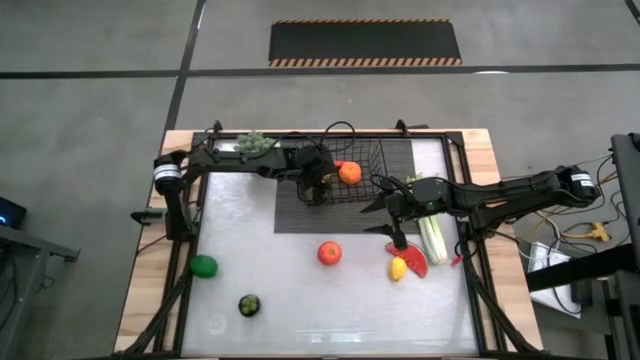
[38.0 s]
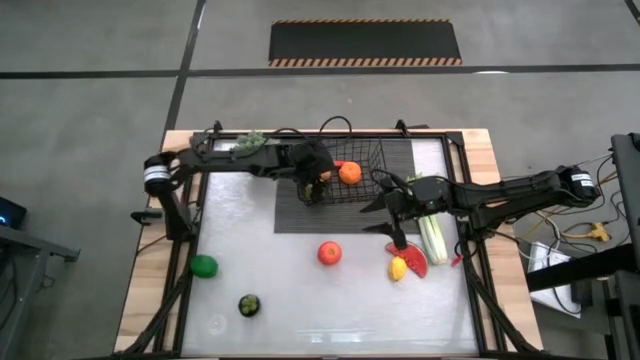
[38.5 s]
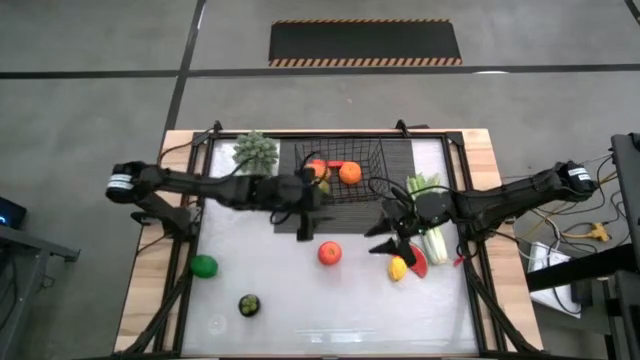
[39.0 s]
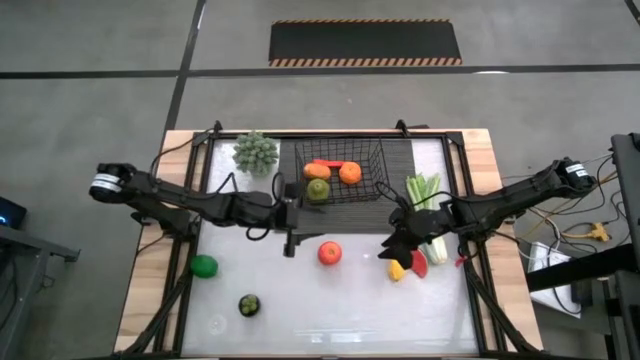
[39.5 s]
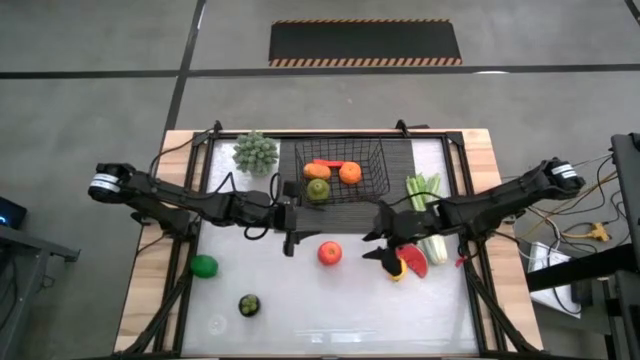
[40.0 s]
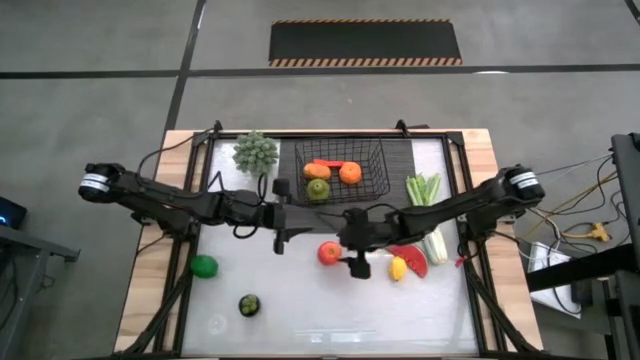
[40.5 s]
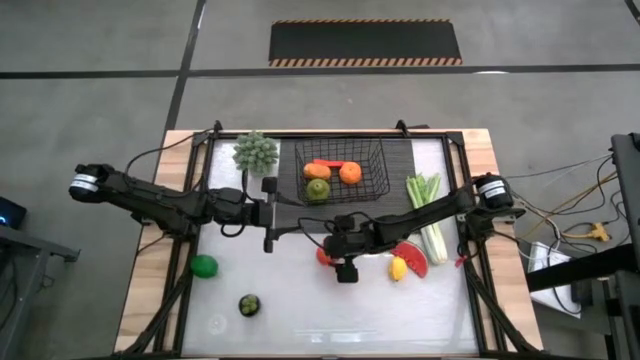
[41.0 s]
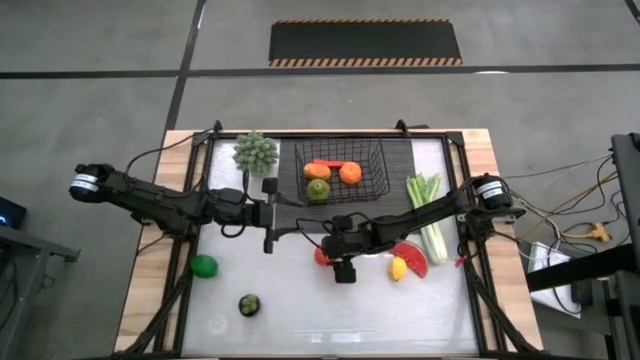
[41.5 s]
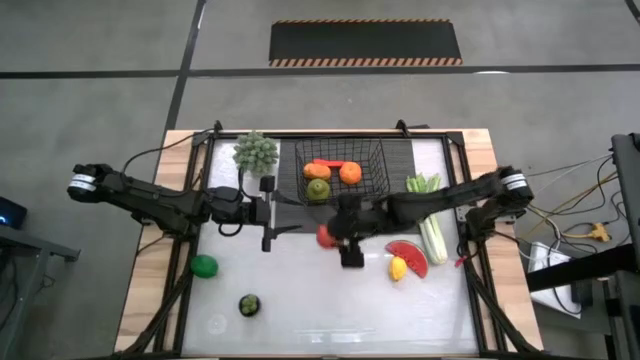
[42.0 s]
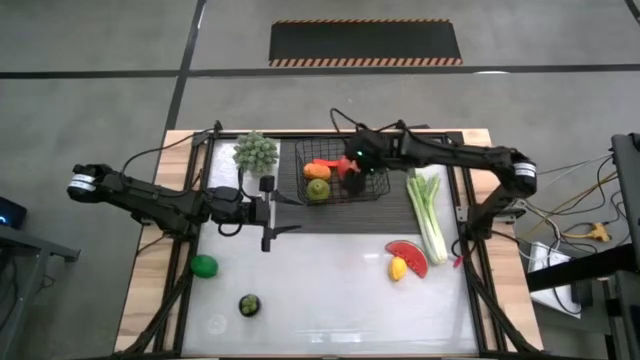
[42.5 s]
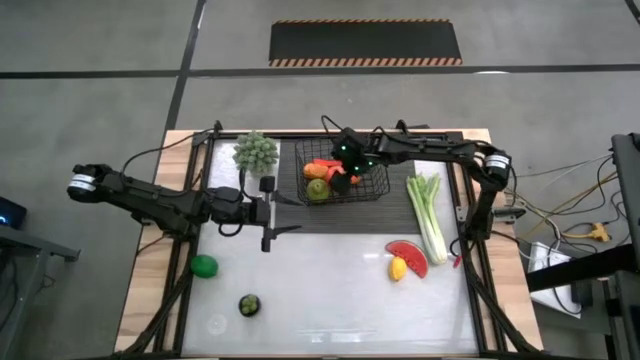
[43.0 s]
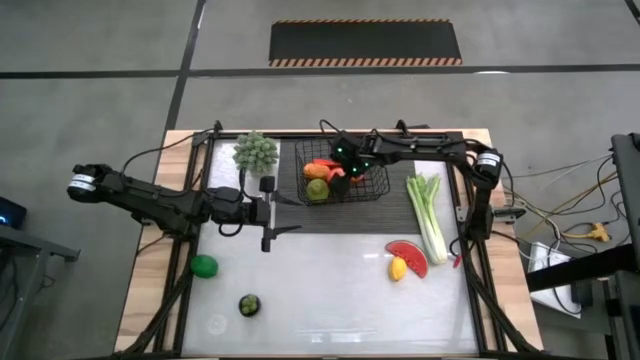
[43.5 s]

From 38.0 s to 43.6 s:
Task: Build produce basket
Put the red apple into the black wire basket

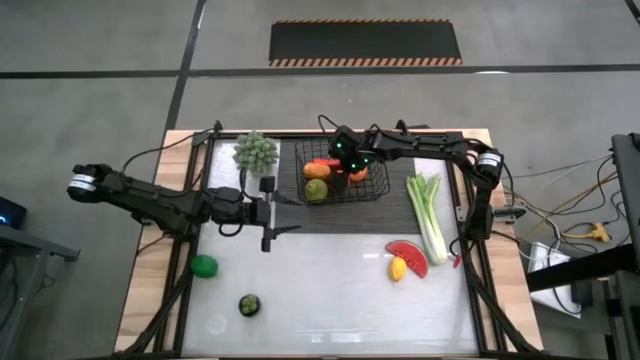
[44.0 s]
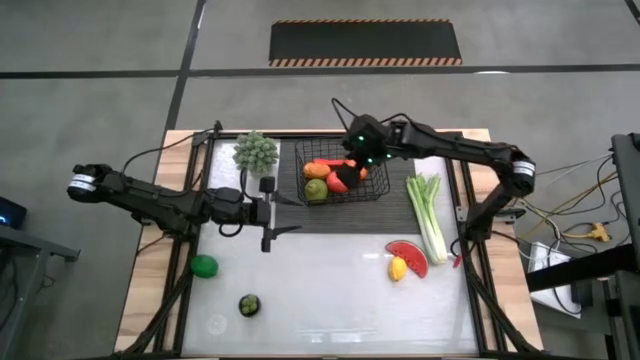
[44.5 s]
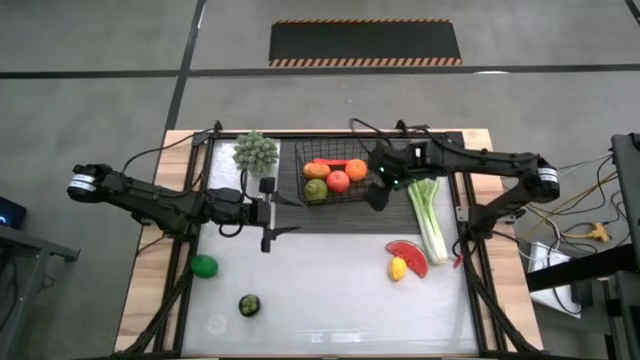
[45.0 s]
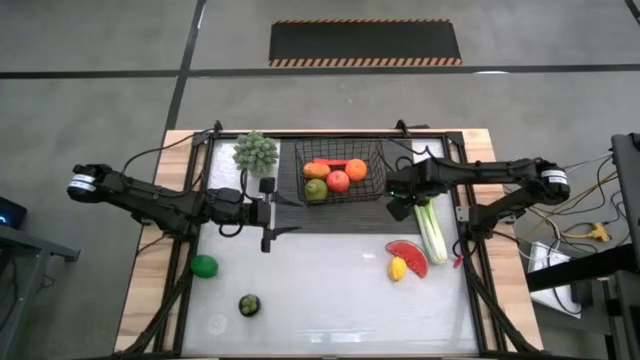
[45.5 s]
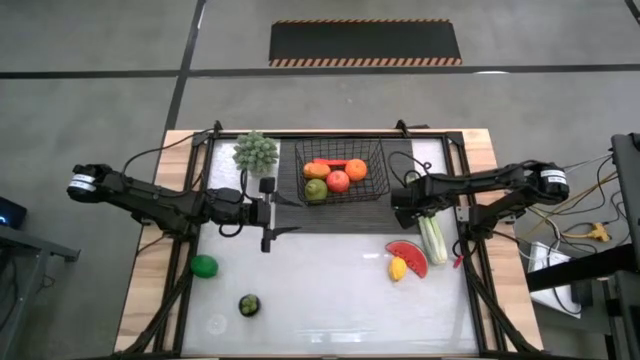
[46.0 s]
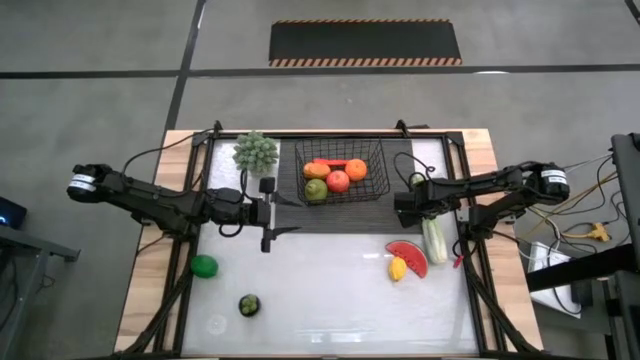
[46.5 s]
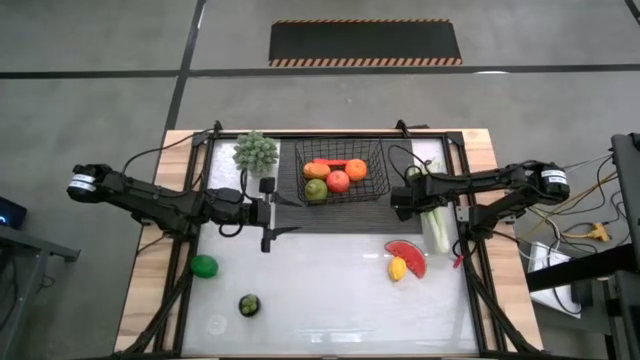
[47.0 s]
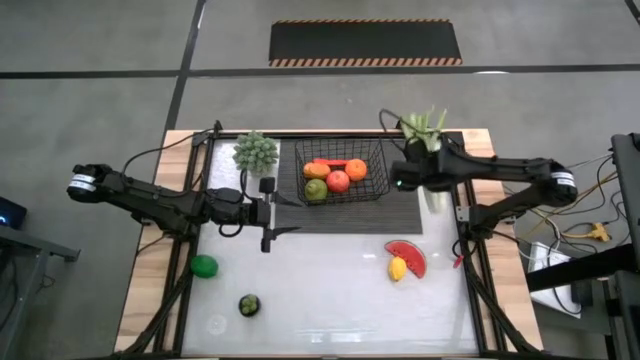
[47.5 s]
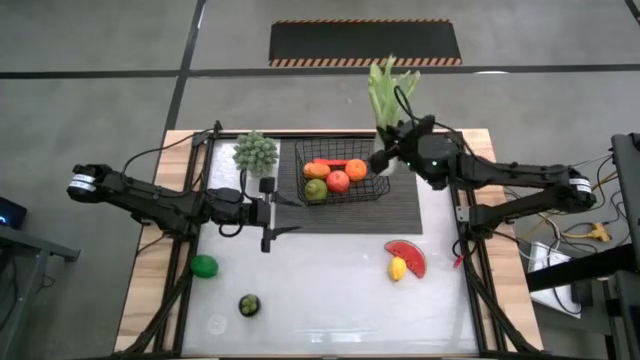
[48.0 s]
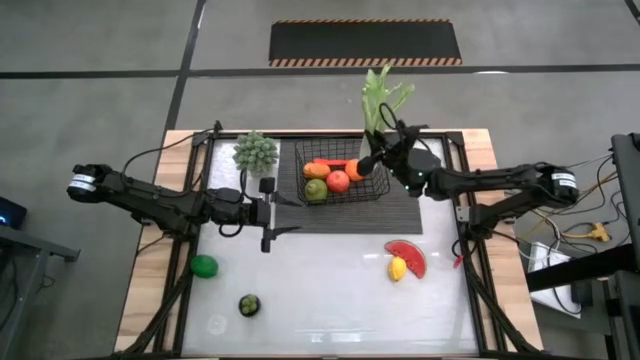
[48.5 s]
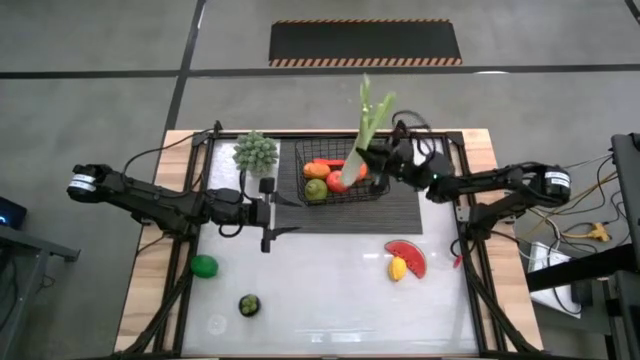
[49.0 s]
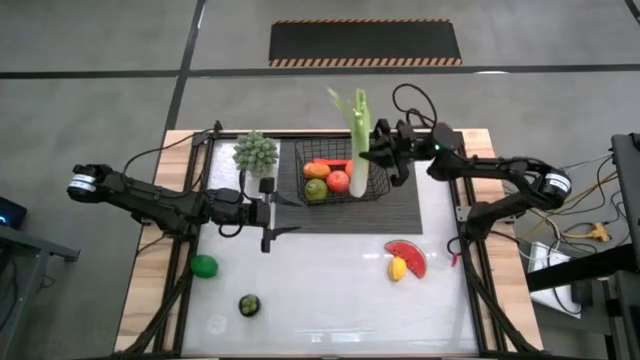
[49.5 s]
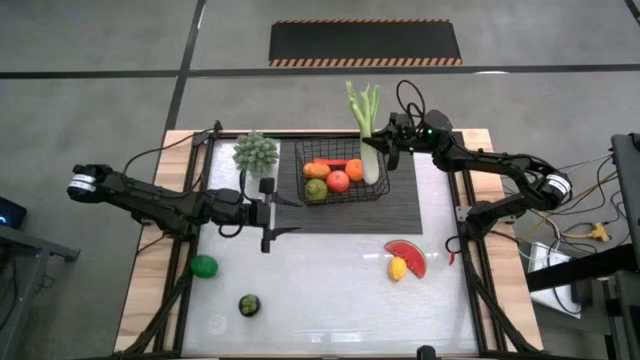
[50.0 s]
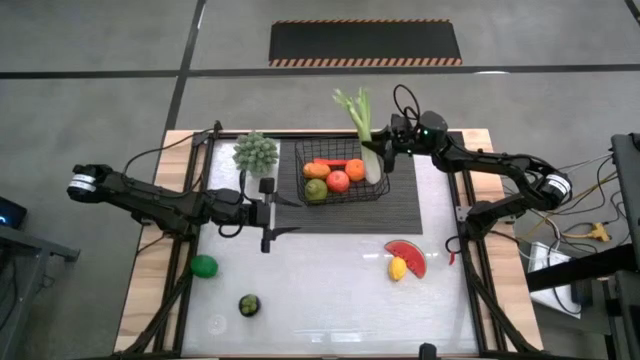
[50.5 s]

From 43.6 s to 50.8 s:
Put the green celery into the black wire basket

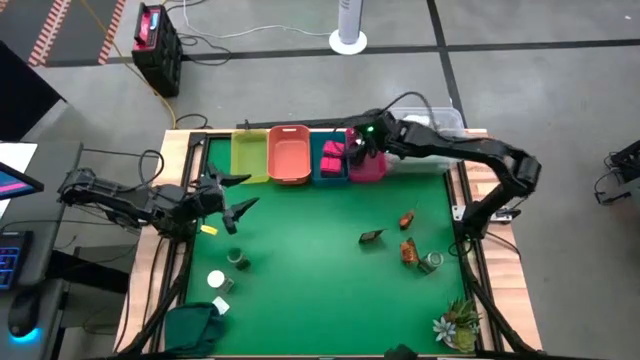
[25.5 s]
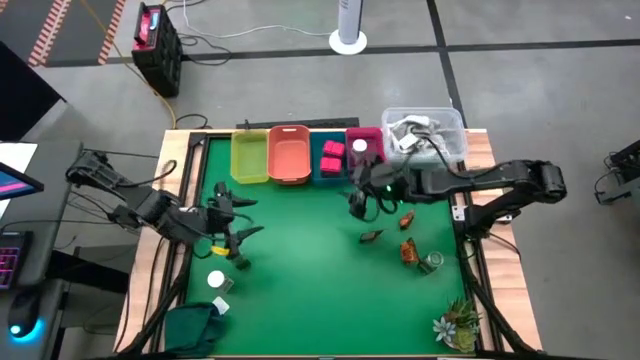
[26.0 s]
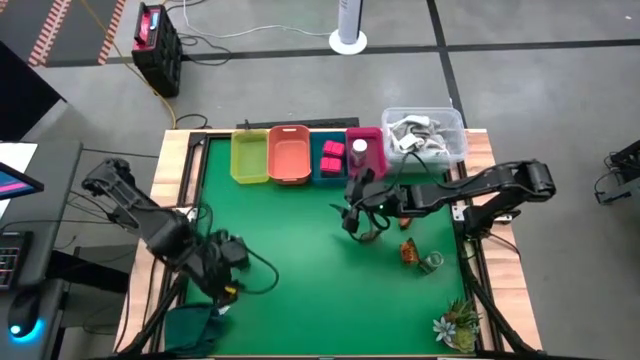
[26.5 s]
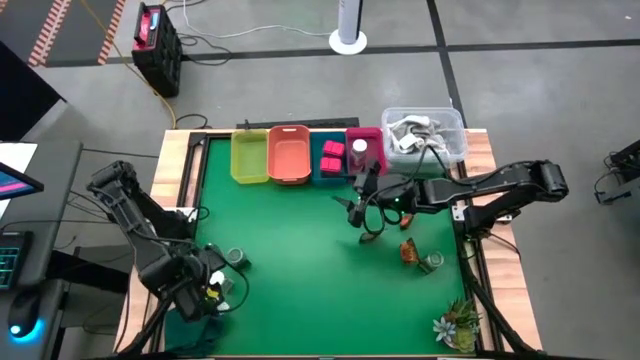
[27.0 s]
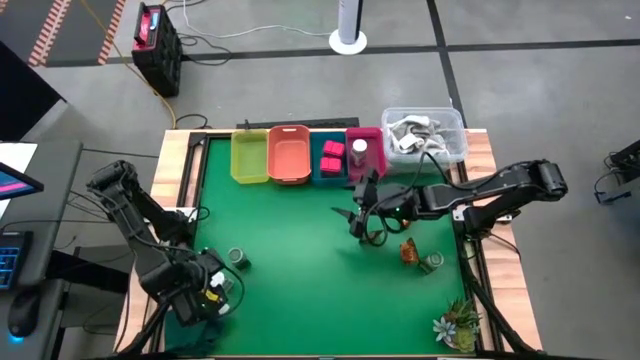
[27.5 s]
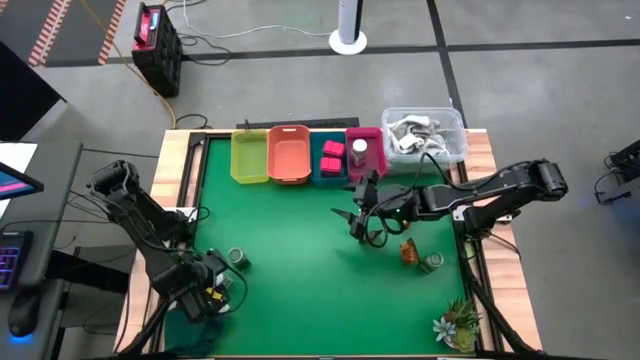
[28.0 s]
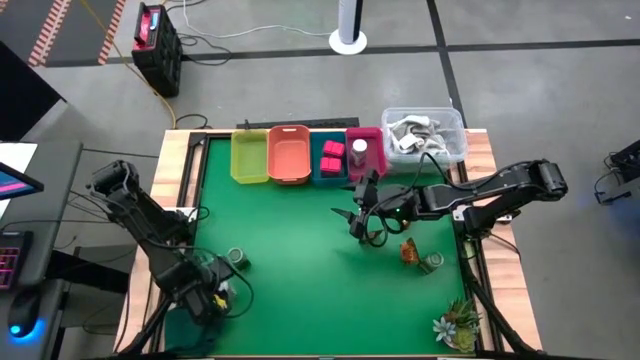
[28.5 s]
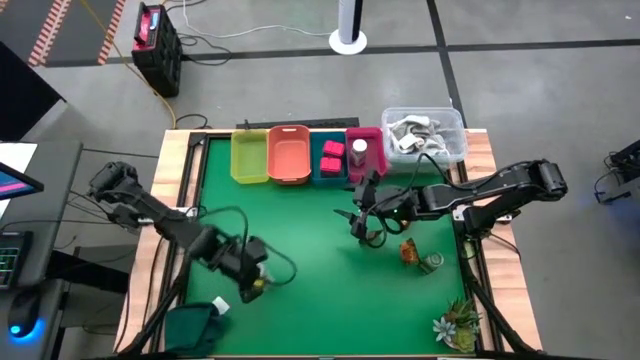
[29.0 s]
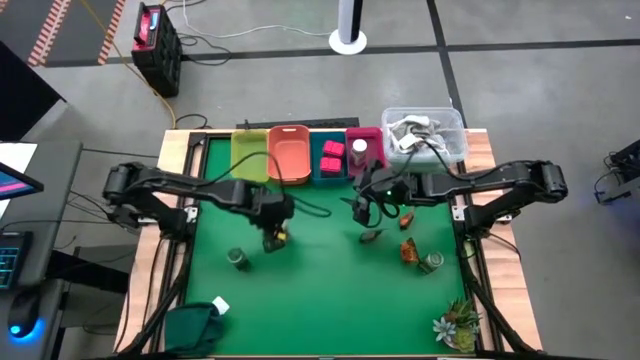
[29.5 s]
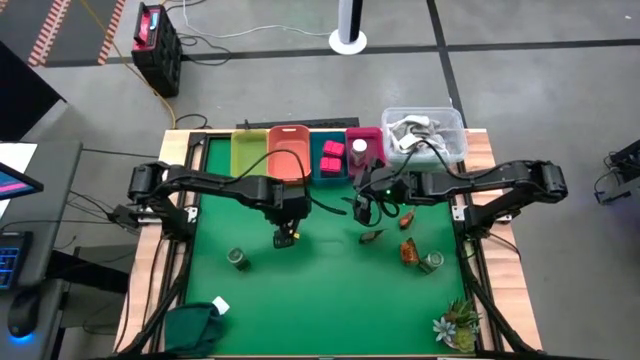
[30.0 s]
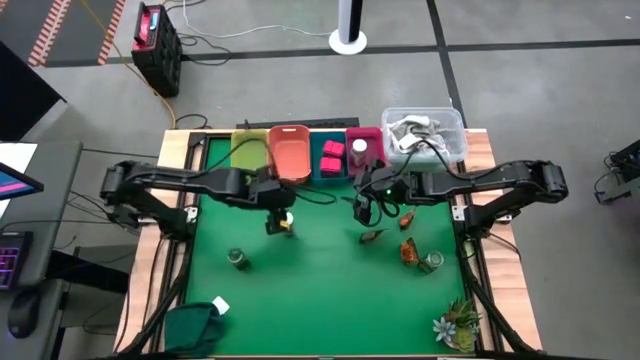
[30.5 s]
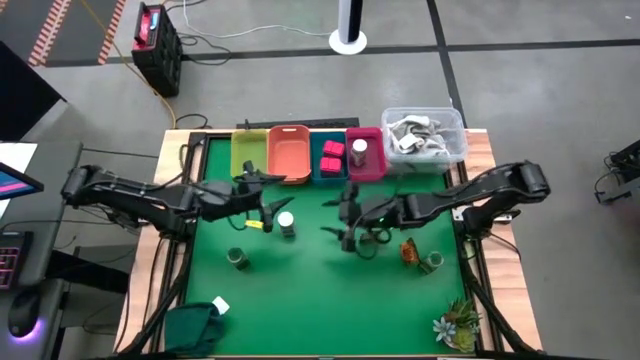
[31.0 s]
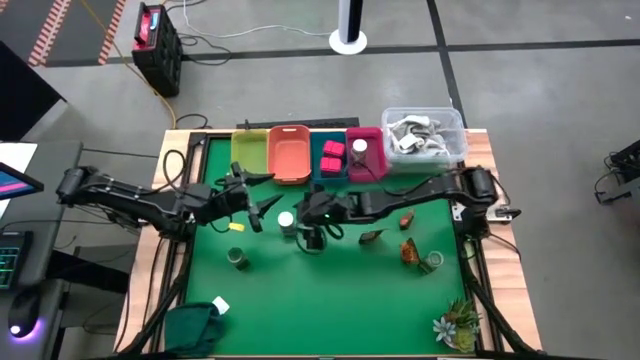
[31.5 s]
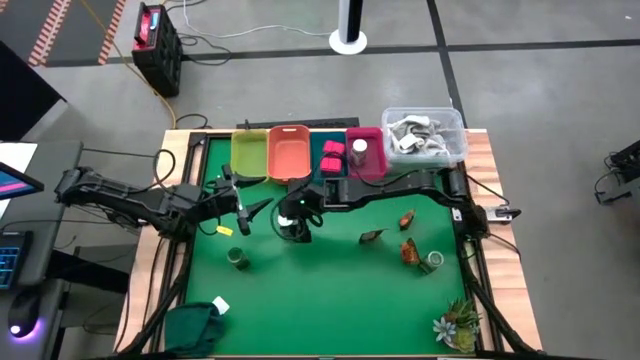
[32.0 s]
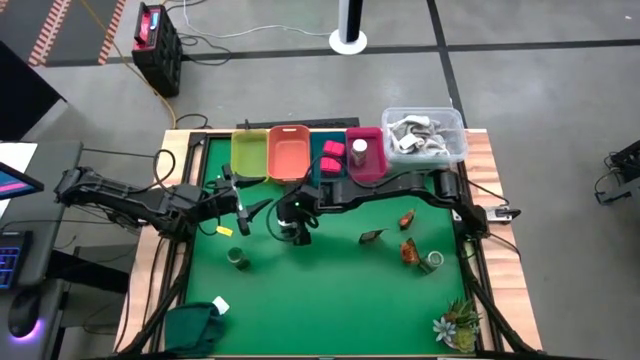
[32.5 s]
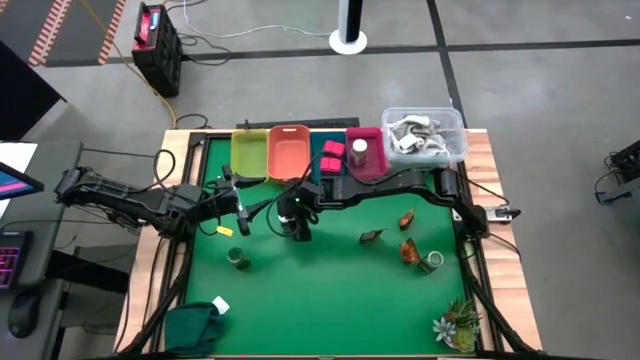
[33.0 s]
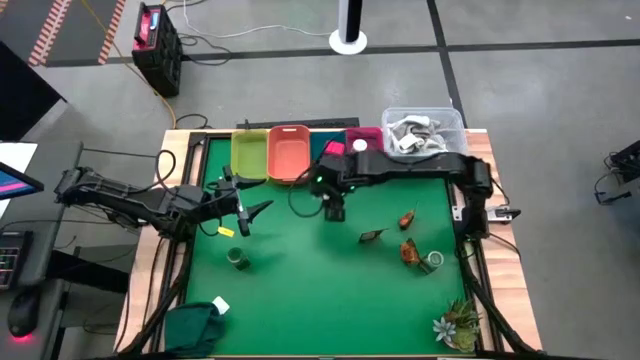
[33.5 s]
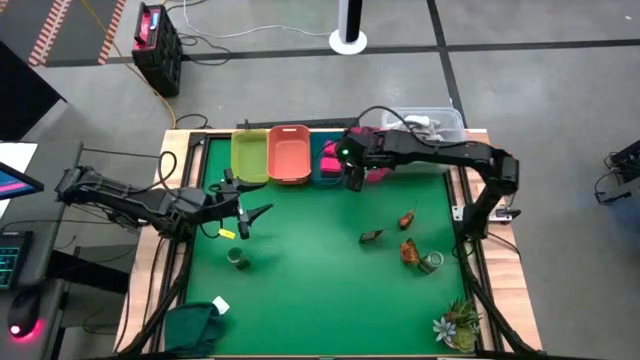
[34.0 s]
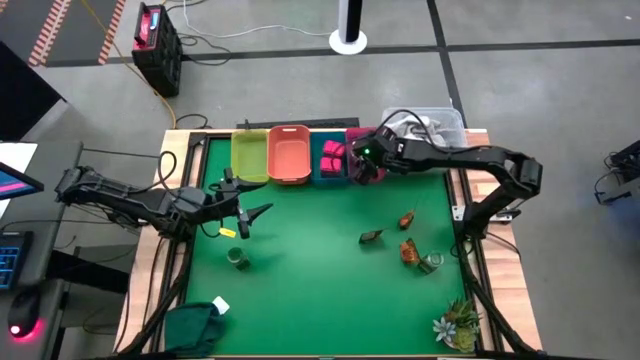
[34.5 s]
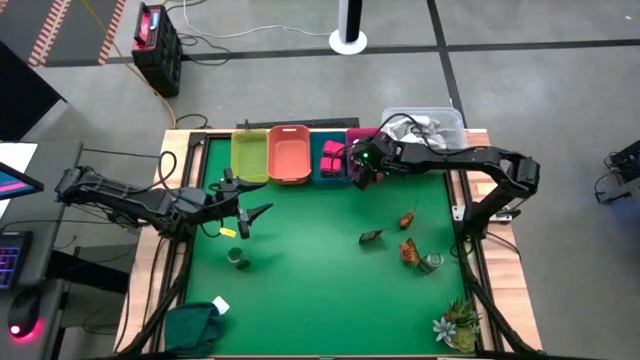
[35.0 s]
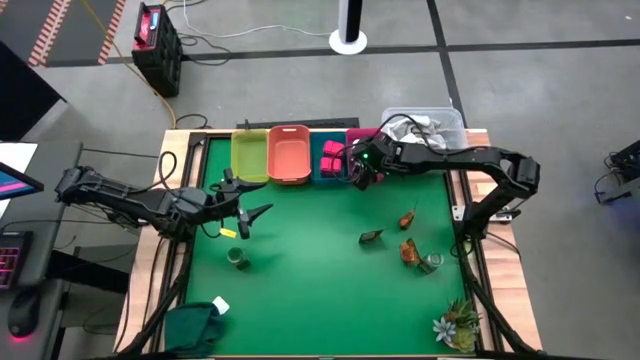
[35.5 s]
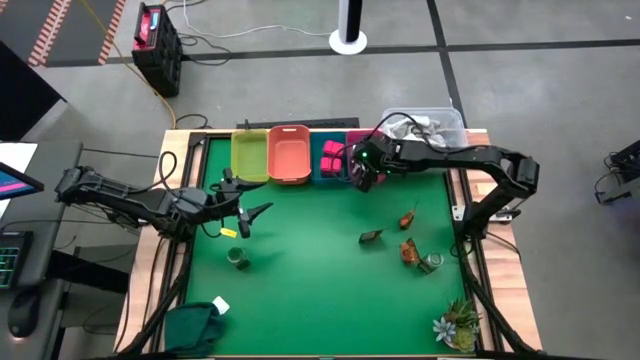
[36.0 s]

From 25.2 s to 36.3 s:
Task: Sort spices by type
Put the white seasoning bottle into the red bin
